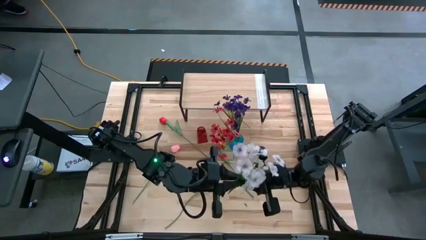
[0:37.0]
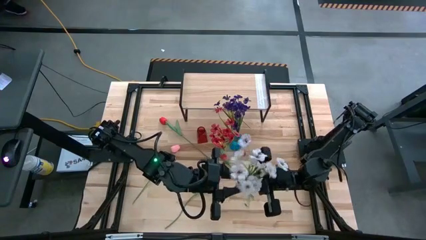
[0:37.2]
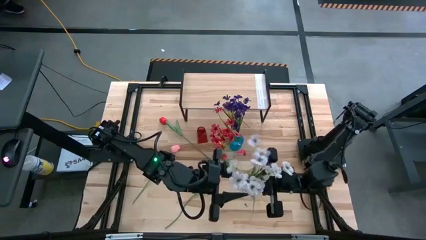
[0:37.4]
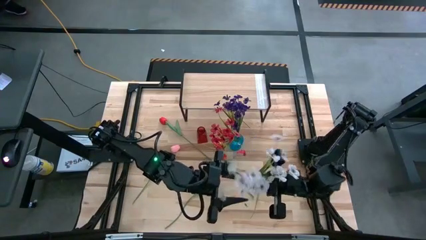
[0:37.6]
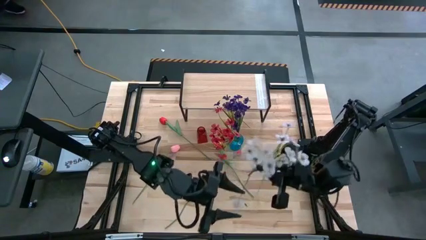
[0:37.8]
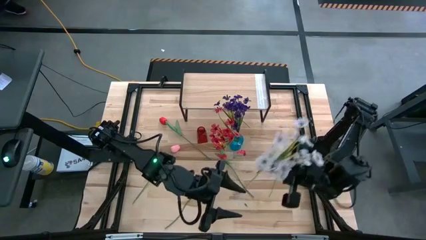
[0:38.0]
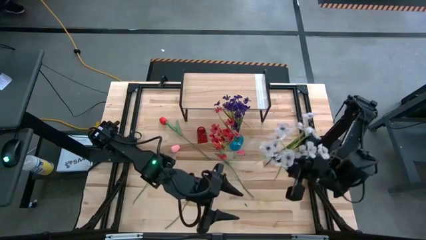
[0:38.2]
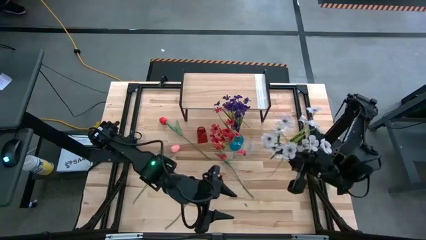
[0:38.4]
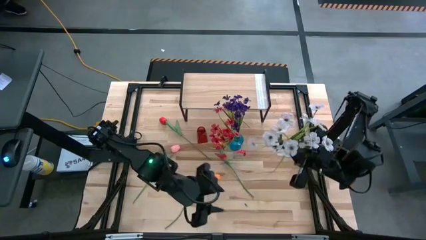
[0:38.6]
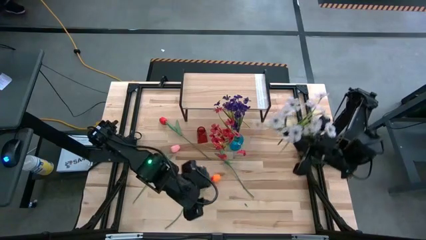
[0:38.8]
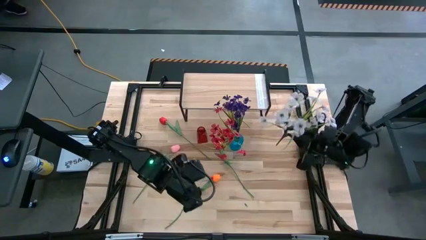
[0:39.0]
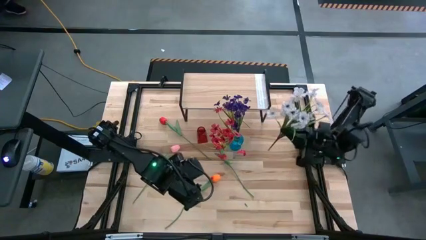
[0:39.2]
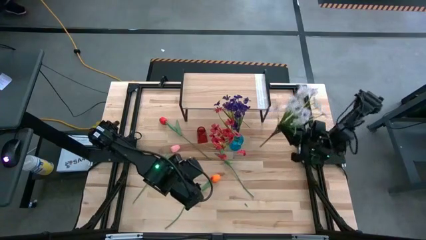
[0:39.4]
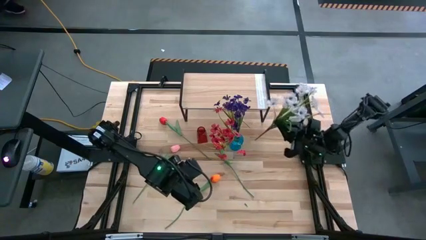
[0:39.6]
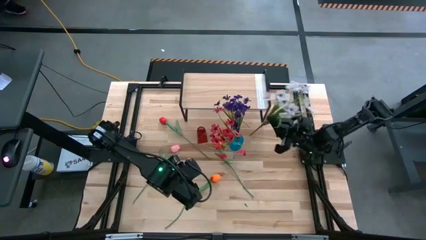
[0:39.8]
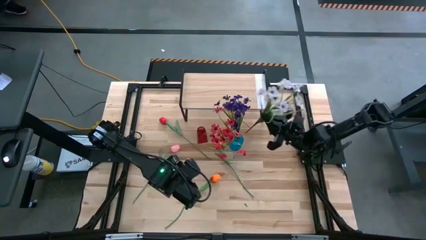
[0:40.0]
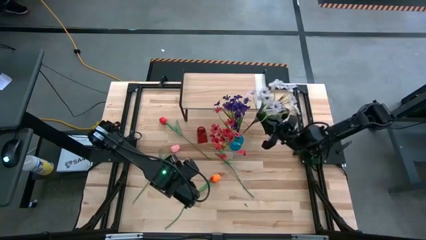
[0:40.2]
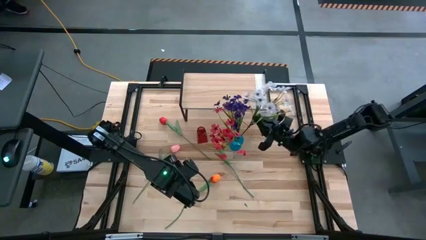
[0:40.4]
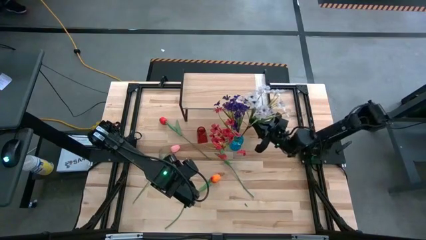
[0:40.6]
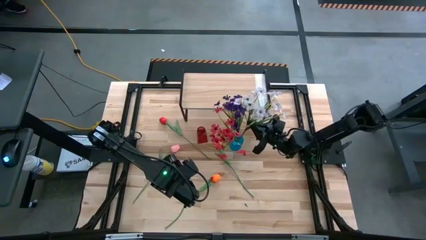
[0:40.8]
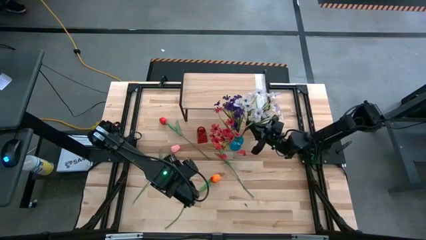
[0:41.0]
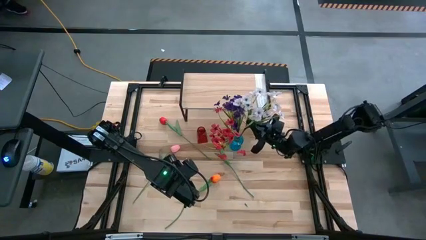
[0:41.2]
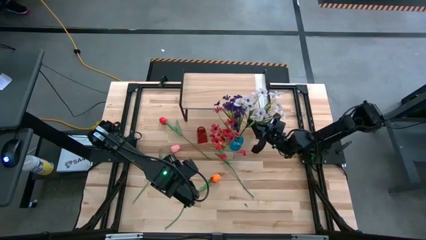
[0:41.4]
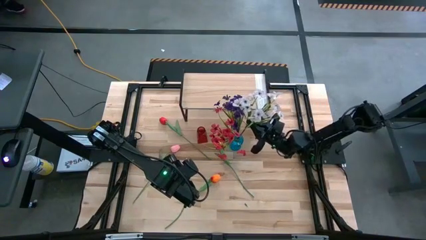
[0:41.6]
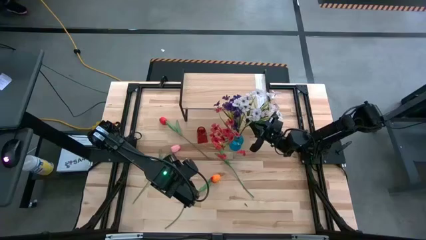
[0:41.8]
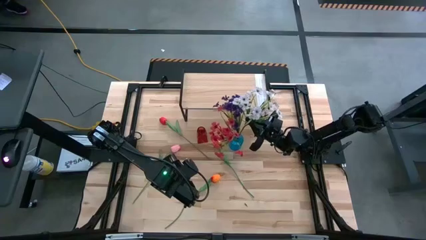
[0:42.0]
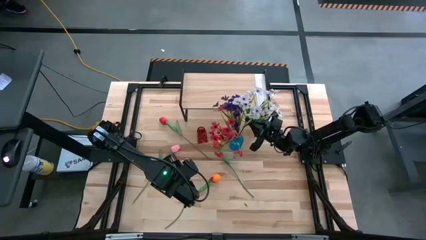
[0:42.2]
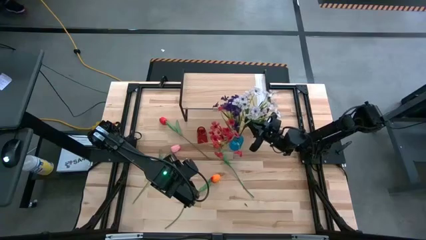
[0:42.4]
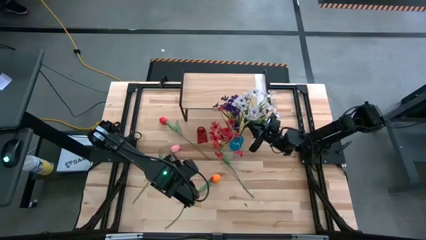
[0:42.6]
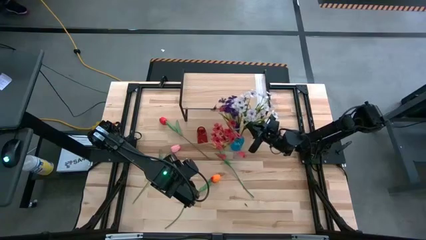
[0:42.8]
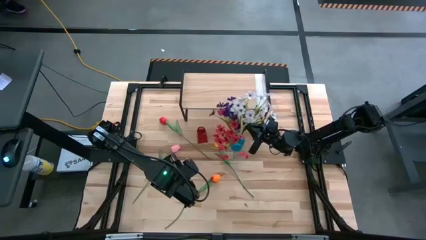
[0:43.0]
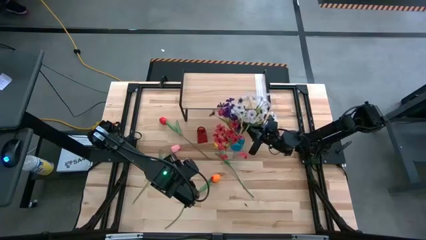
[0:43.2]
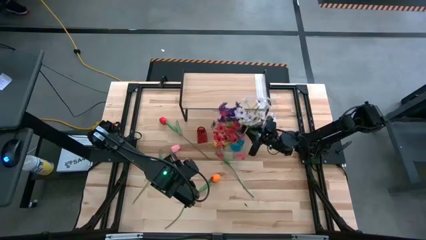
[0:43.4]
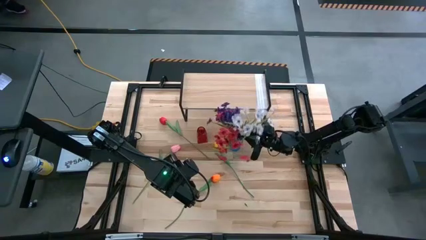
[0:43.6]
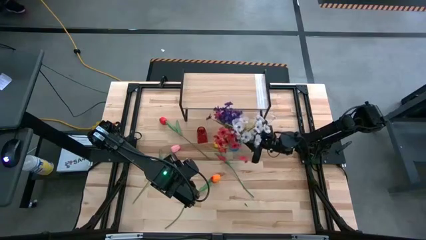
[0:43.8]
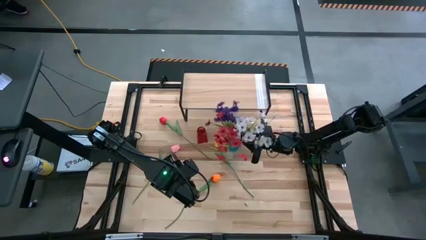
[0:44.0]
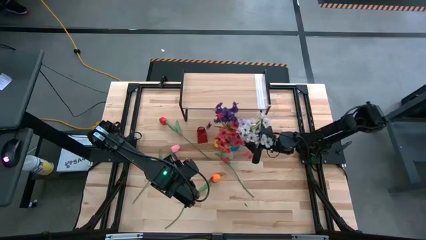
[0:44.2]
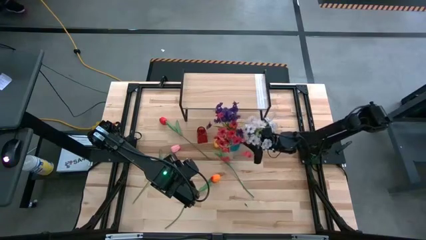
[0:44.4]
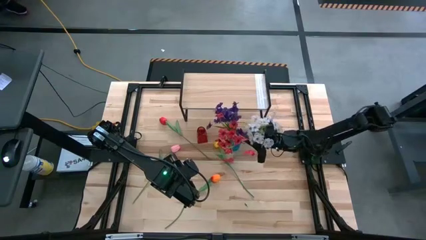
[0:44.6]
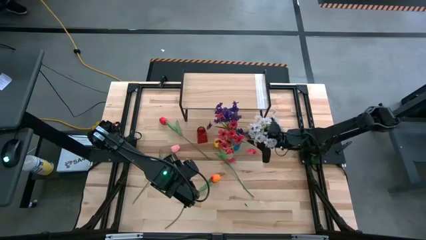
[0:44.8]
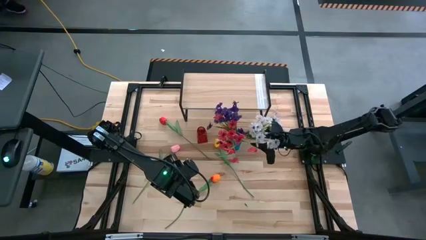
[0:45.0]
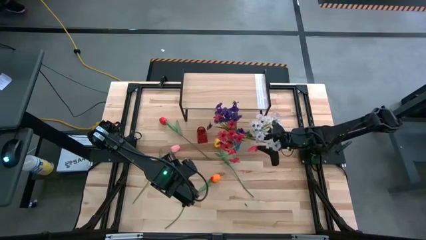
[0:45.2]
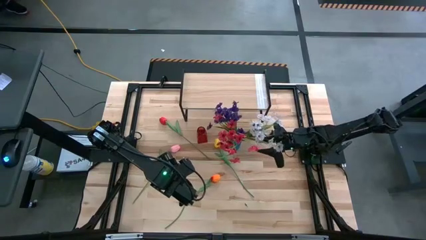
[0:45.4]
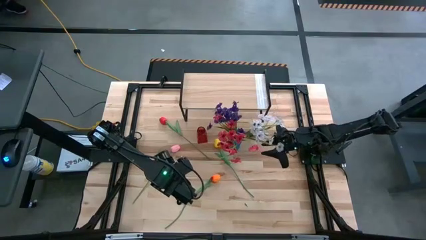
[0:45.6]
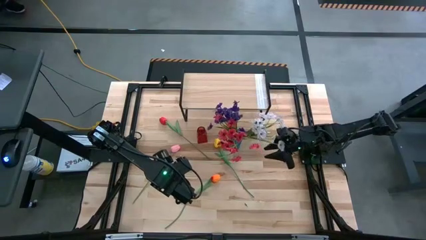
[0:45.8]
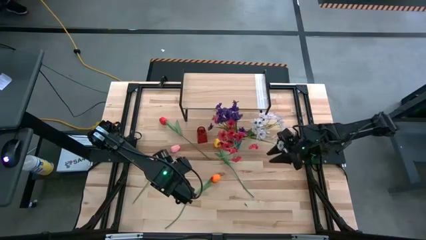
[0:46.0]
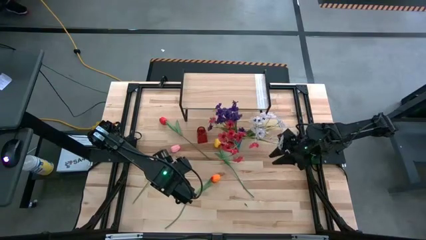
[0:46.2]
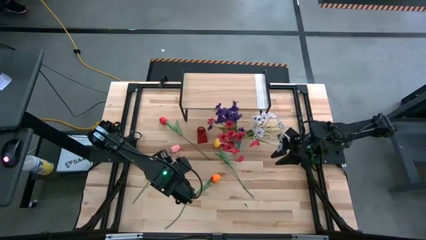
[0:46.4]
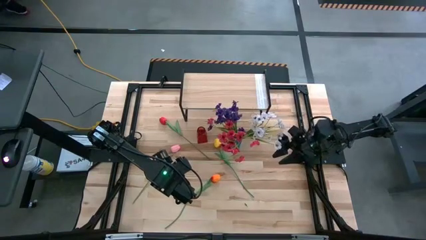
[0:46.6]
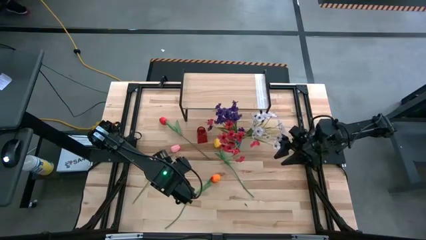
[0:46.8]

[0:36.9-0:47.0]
Task: Pick and place flowers into a vace then onto a shelf
Put the white flowers into the blue vase
